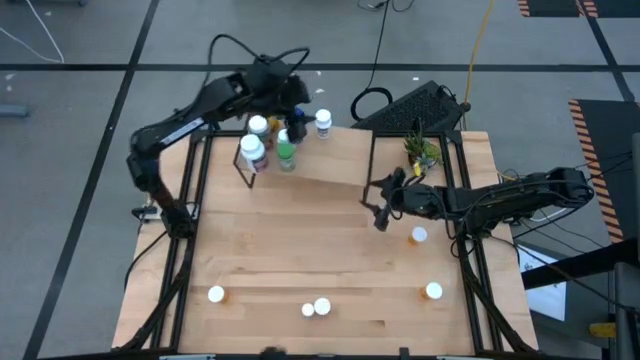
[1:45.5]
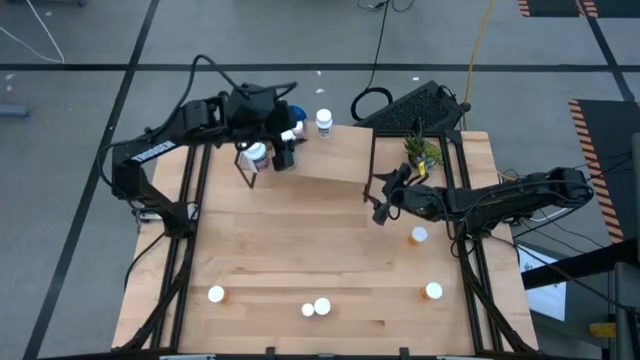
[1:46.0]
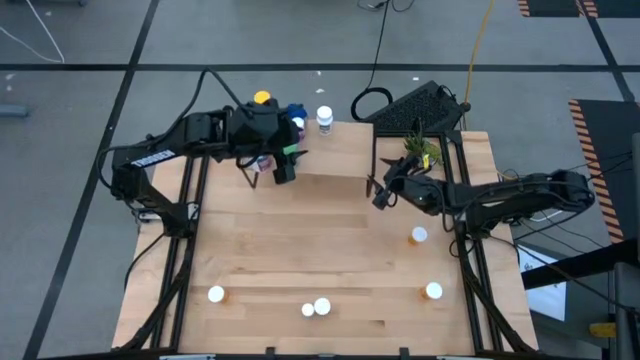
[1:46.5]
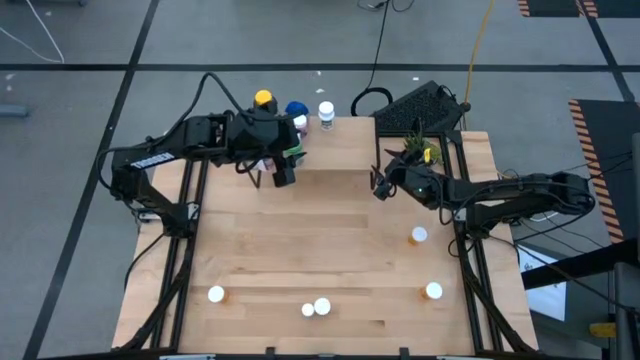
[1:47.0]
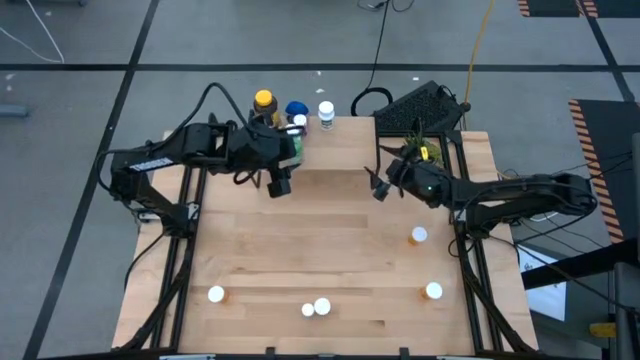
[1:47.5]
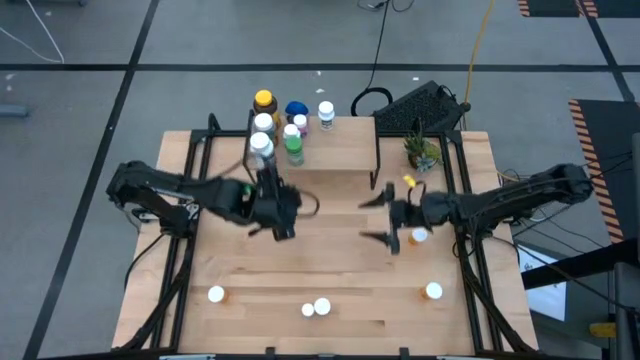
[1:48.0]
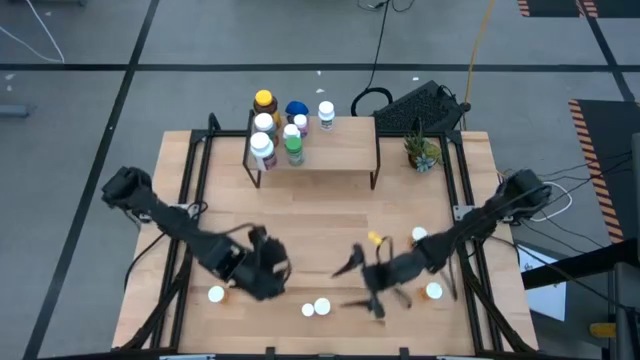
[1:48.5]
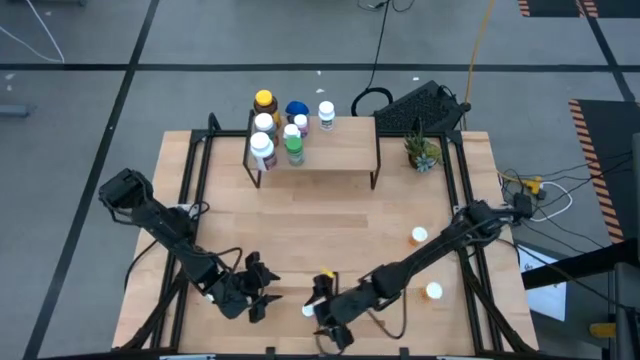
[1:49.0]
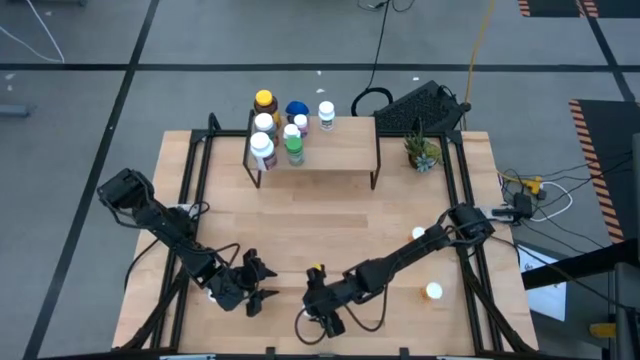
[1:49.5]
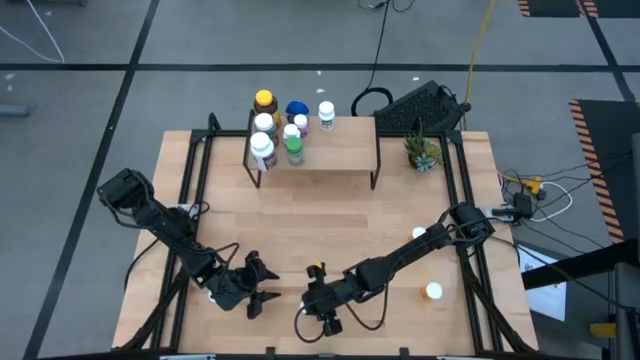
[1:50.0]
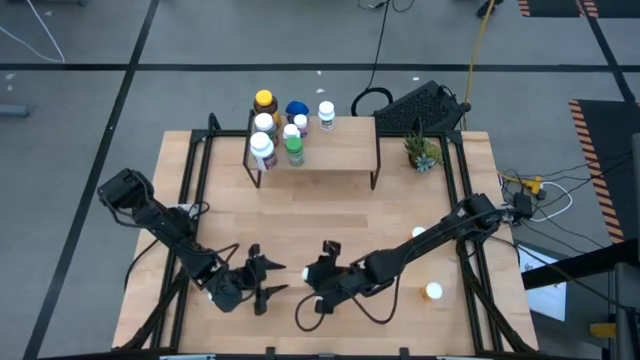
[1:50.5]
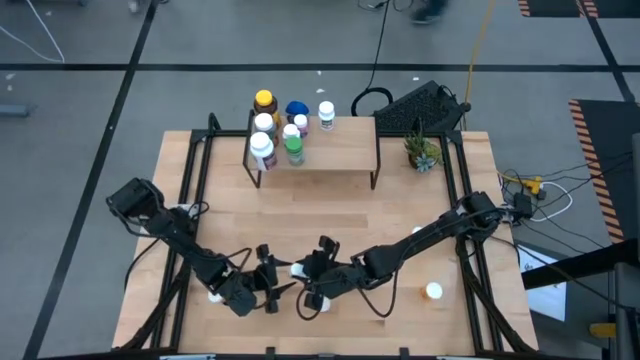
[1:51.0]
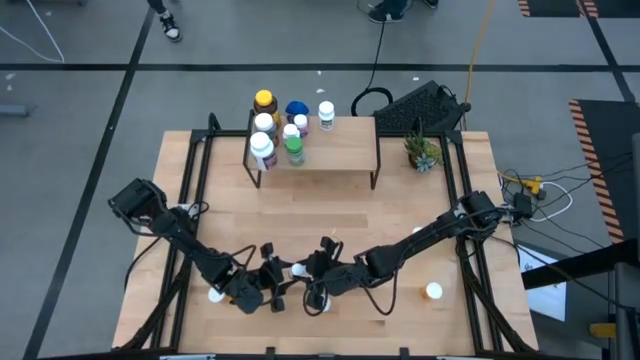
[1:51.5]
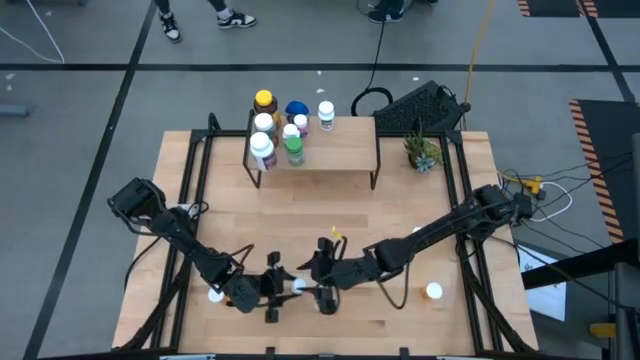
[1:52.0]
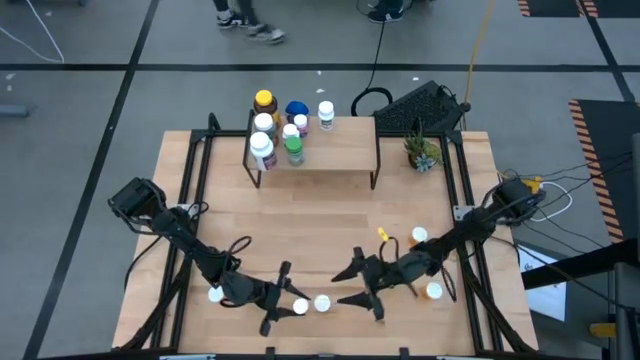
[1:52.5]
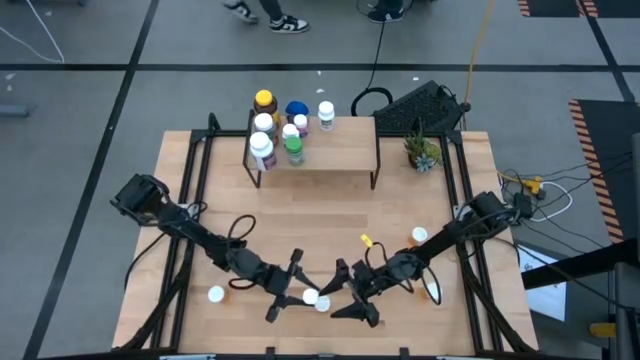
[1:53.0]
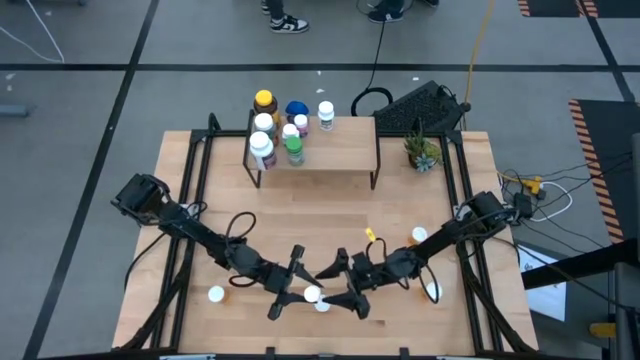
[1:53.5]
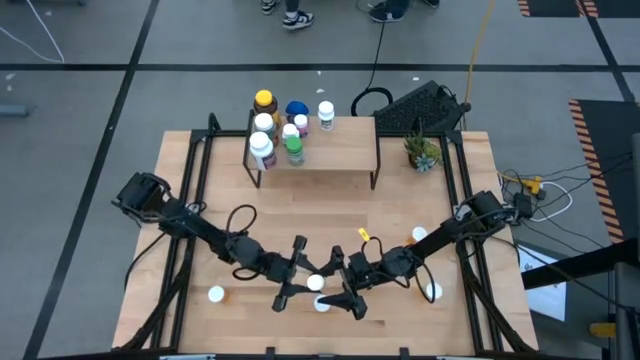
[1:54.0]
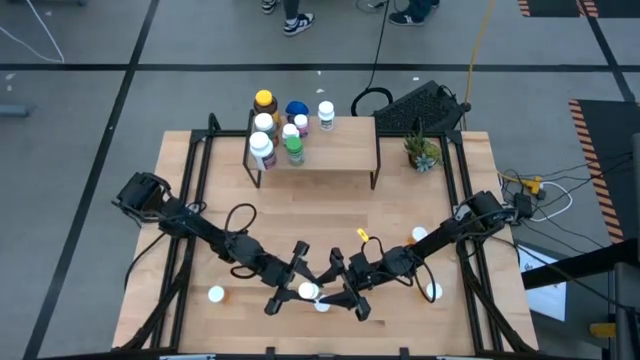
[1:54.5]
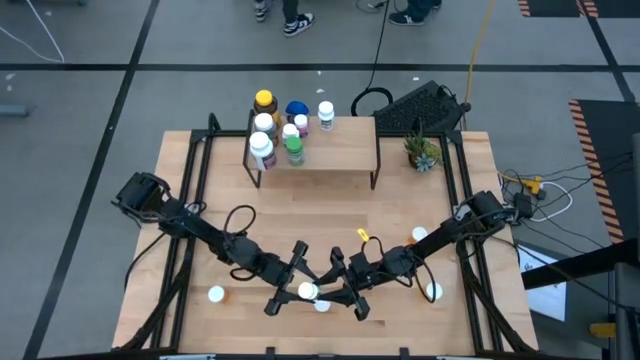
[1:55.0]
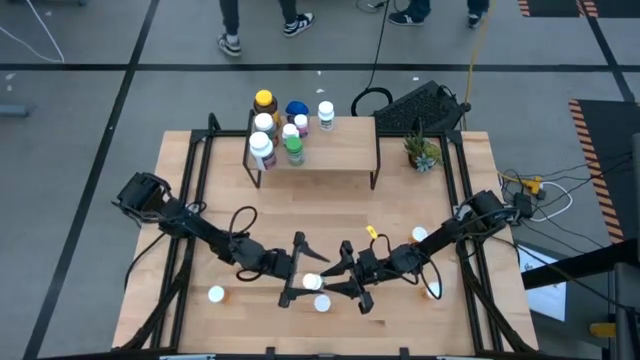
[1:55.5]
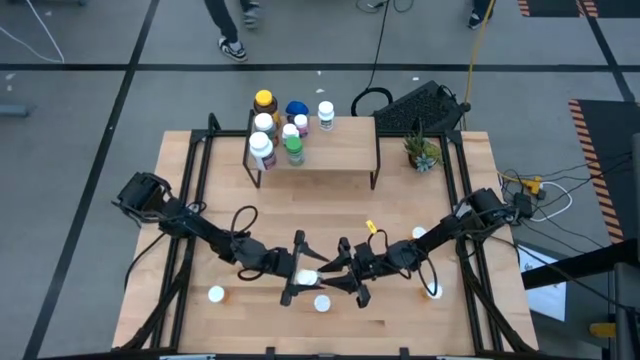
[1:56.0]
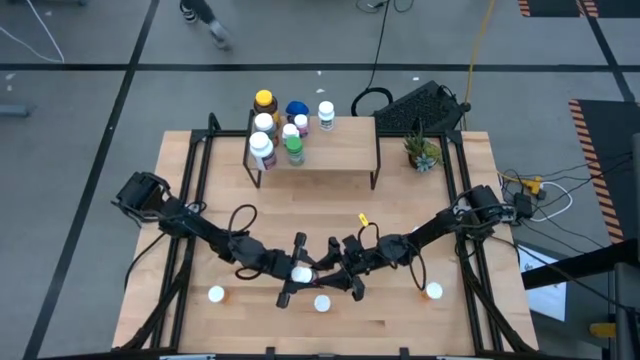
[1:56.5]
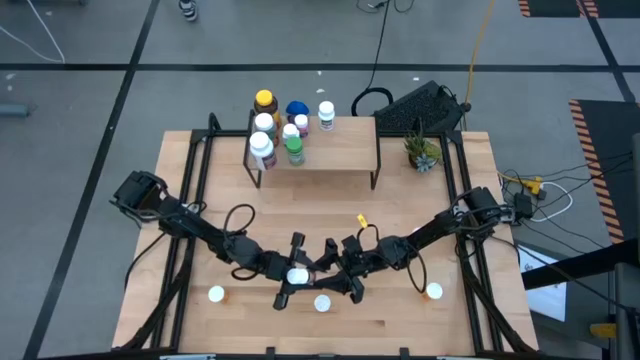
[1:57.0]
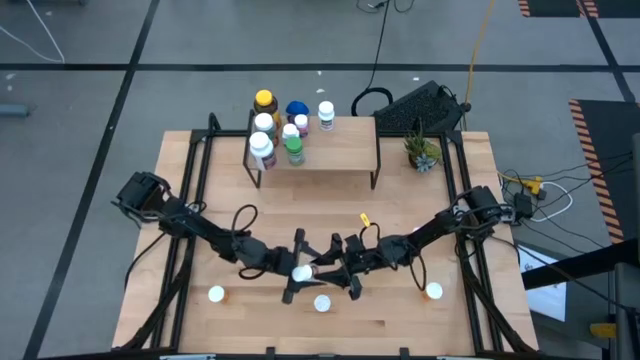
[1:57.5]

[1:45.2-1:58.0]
Task: Pick and place medicine bottles onto shelf by color
Put the white small medicine bottle on the shelf, aligned with the white small medicine bottle

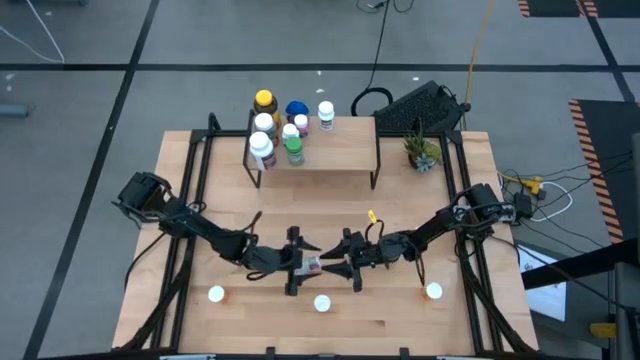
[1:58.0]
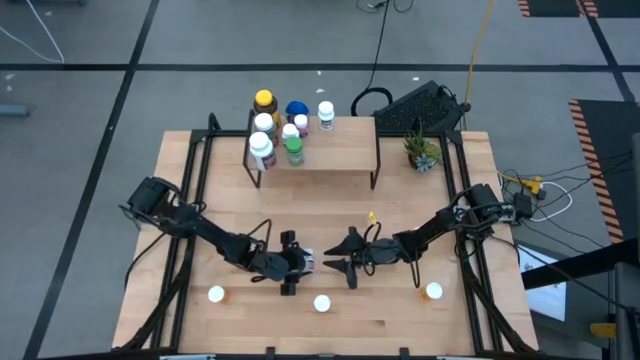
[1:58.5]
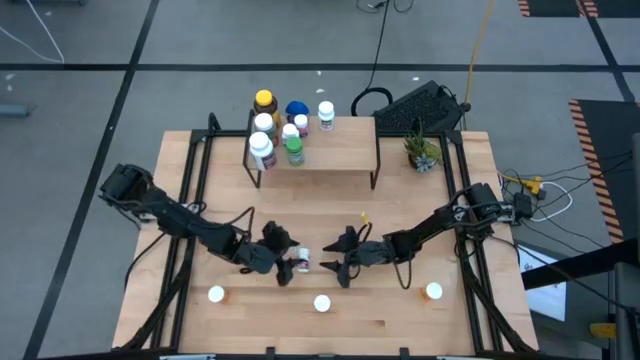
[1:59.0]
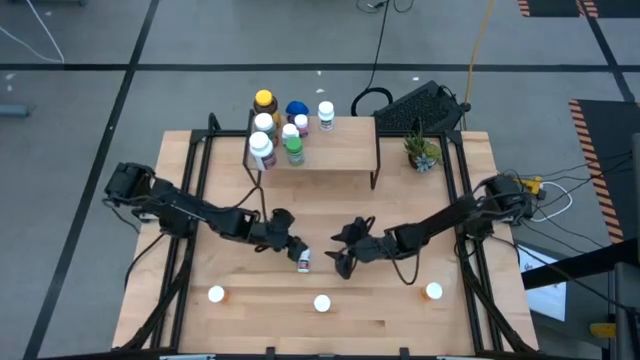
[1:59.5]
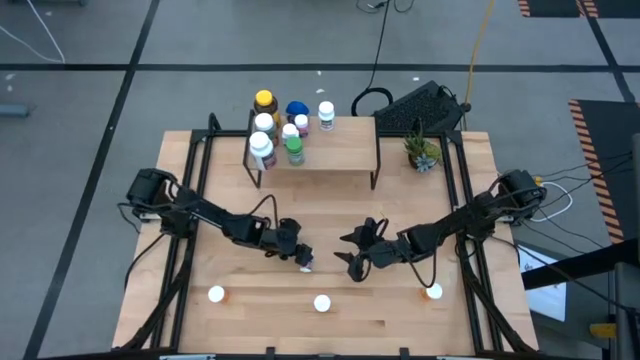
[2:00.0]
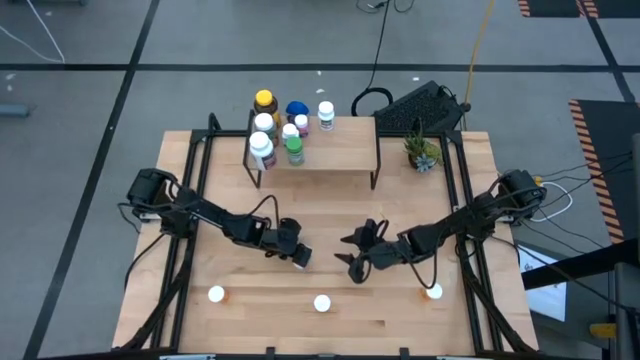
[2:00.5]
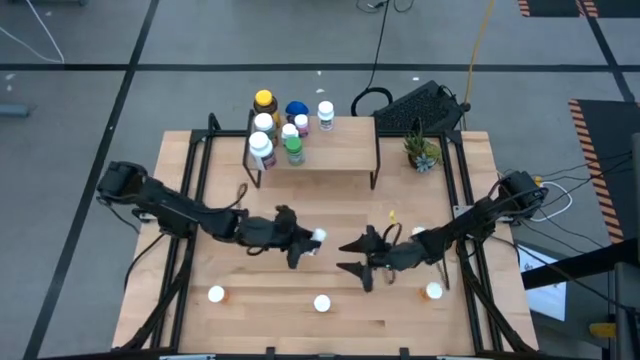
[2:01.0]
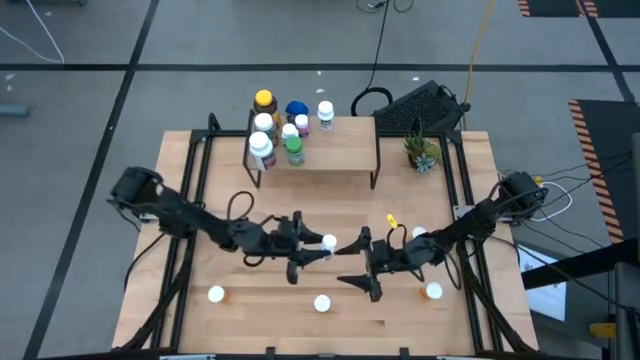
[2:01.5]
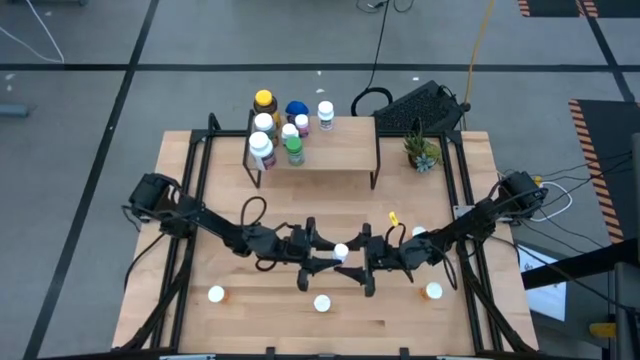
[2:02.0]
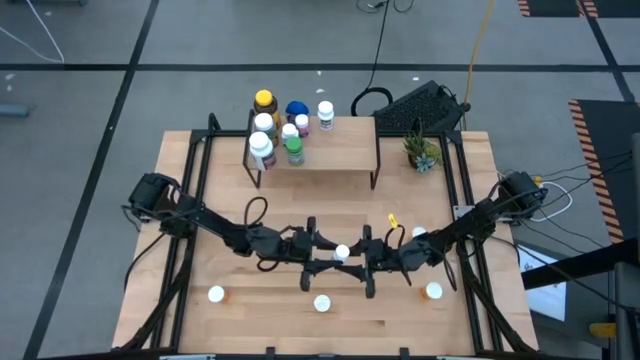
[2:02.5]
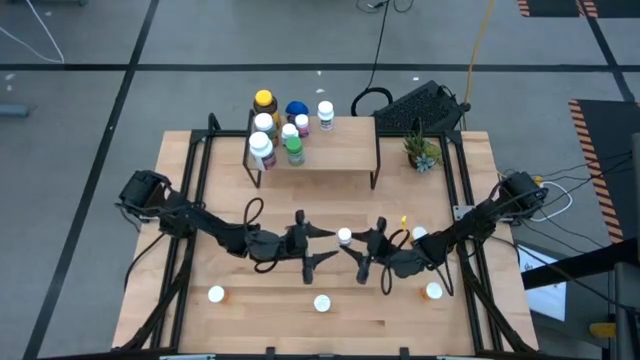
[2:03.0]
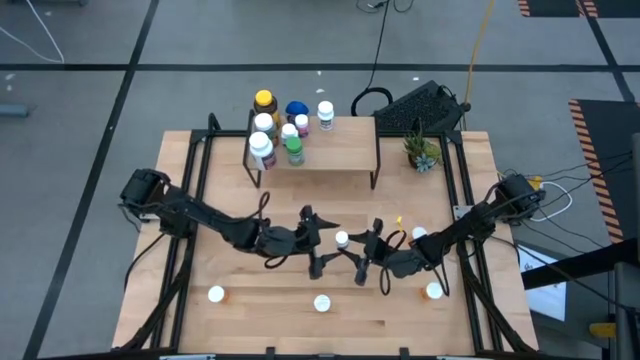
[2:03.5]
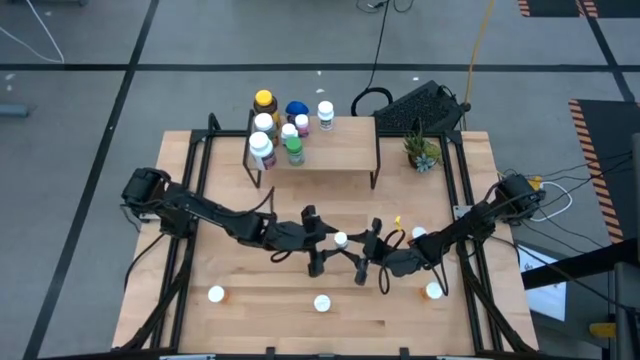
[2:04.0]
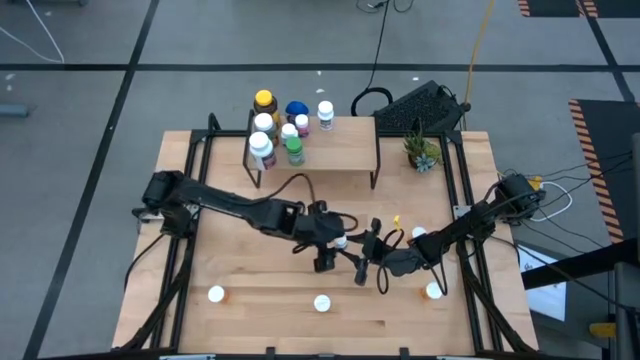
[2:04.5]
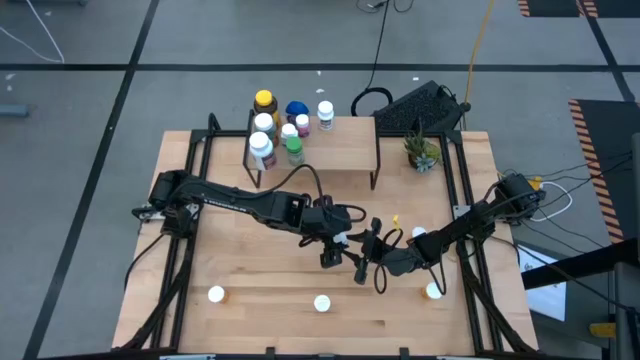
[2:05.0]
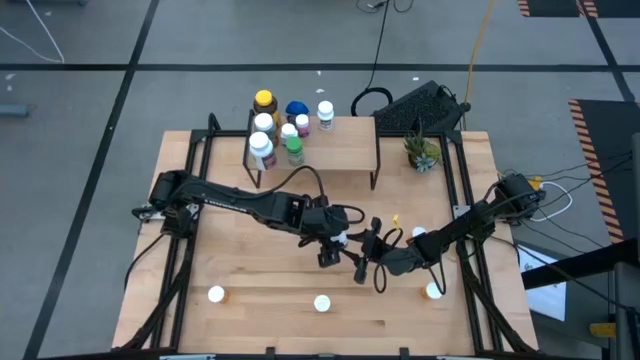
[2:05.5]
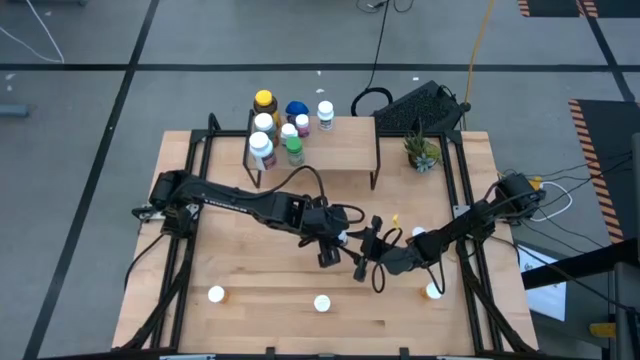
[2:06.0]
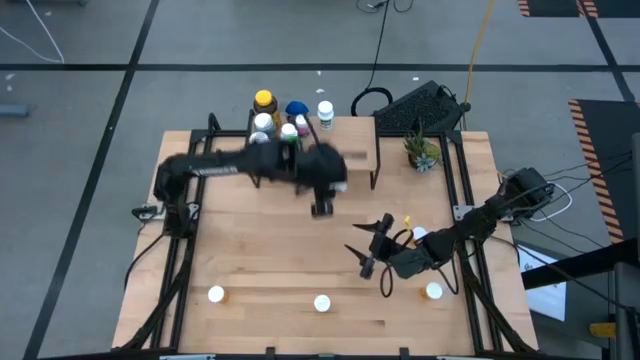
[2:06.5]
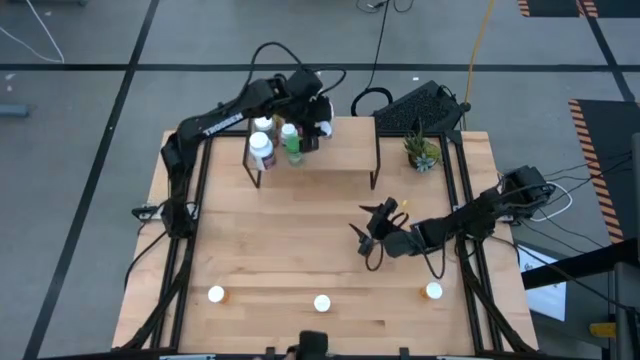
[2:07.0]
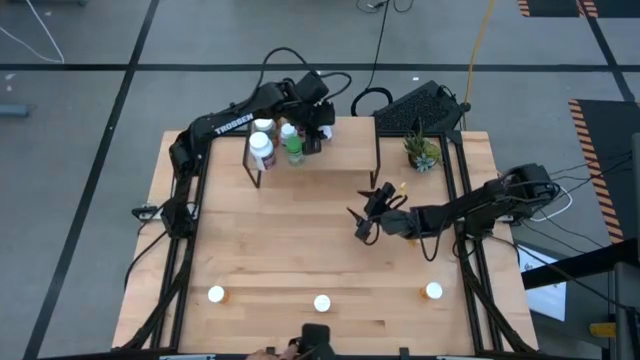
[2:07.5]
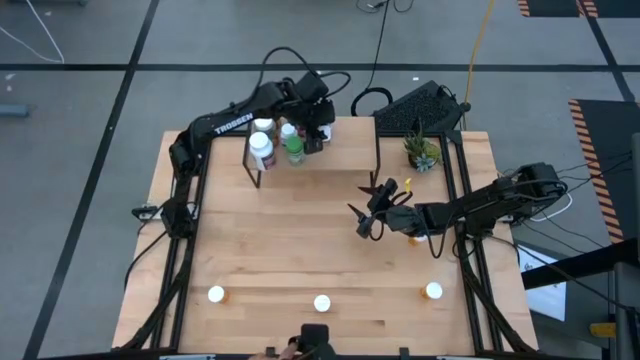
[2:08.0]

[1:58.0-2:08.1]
Put the bottom center white medicine bottle on the shelf, aligned with the white small medicine bottle
